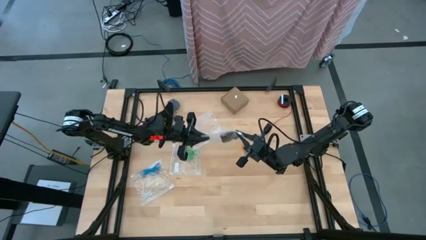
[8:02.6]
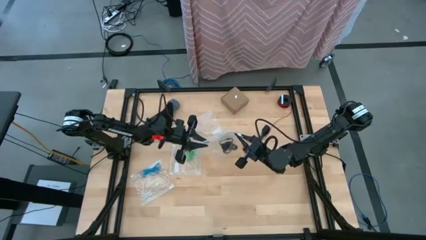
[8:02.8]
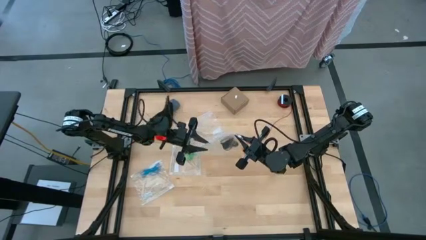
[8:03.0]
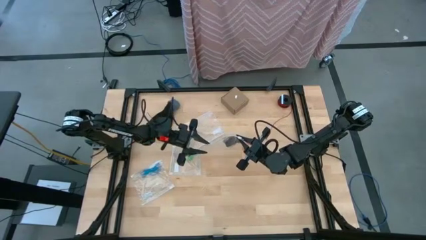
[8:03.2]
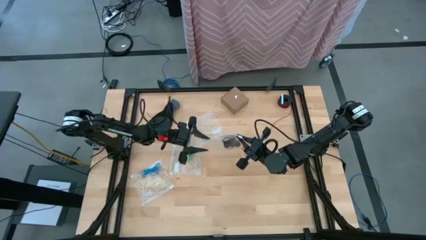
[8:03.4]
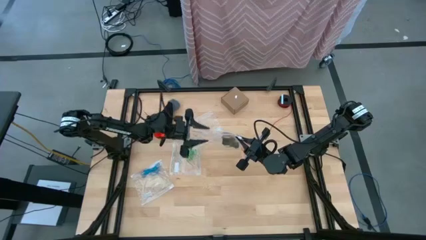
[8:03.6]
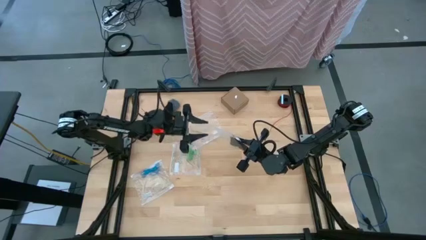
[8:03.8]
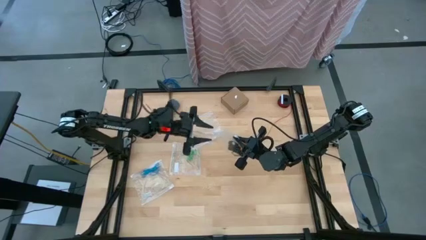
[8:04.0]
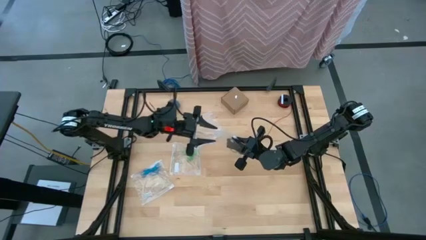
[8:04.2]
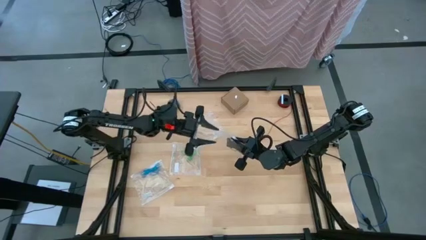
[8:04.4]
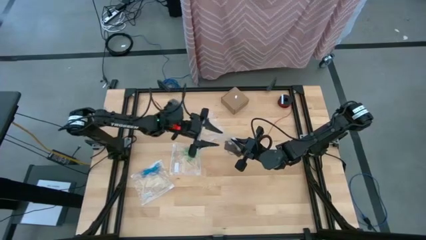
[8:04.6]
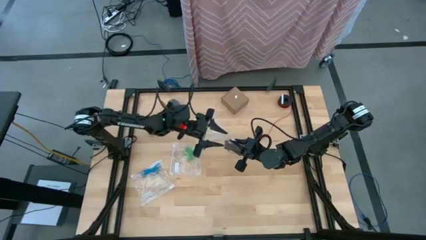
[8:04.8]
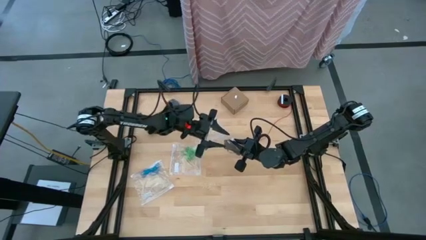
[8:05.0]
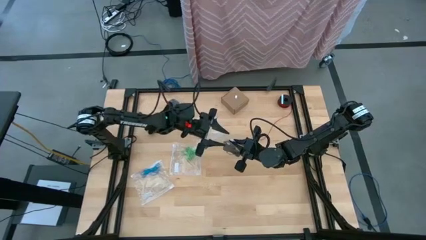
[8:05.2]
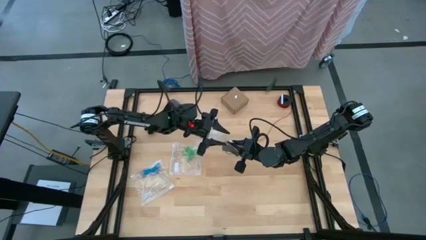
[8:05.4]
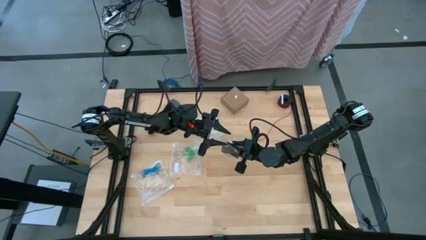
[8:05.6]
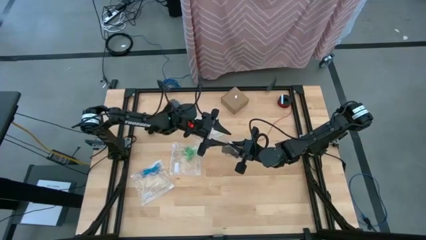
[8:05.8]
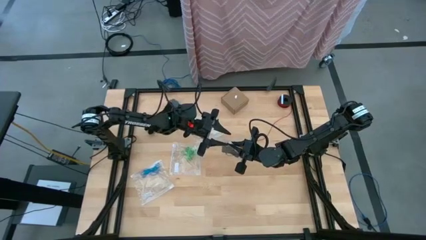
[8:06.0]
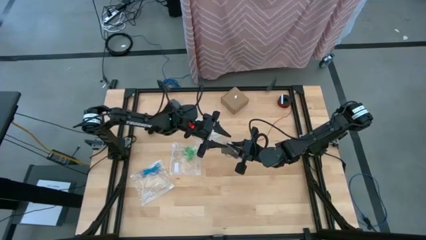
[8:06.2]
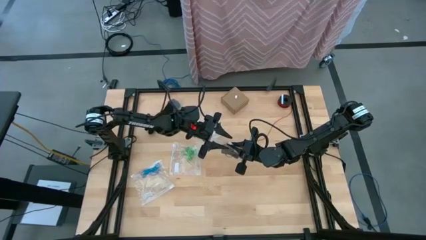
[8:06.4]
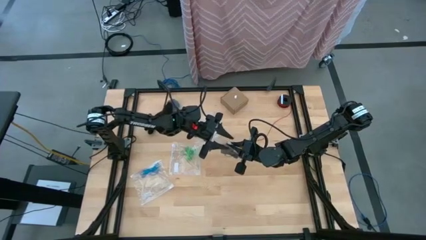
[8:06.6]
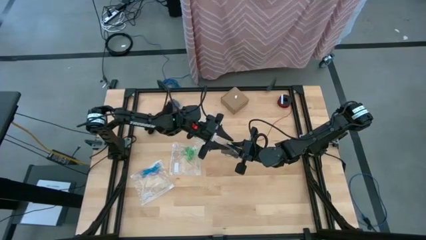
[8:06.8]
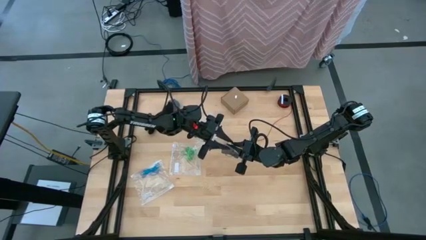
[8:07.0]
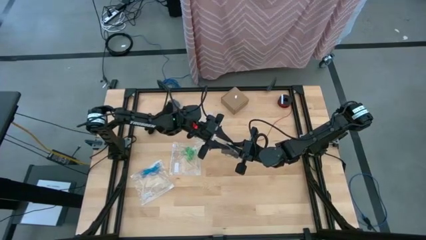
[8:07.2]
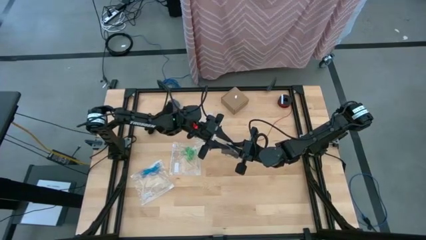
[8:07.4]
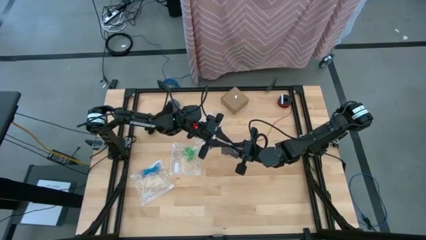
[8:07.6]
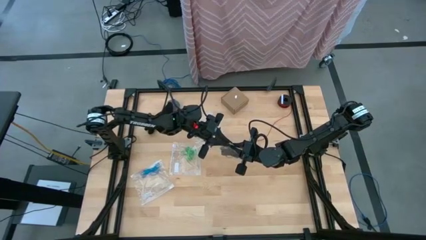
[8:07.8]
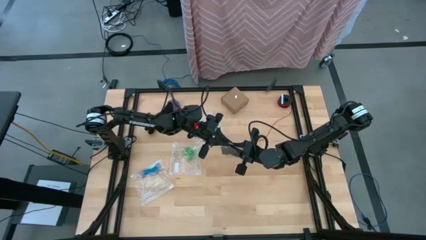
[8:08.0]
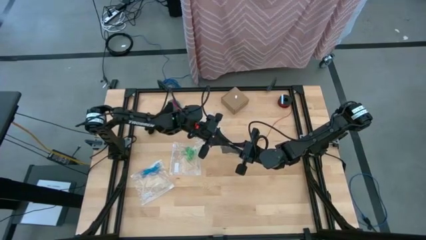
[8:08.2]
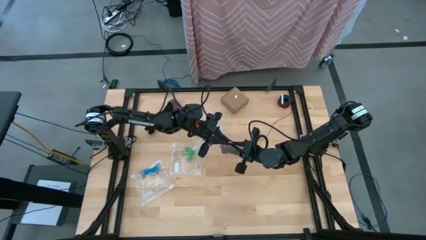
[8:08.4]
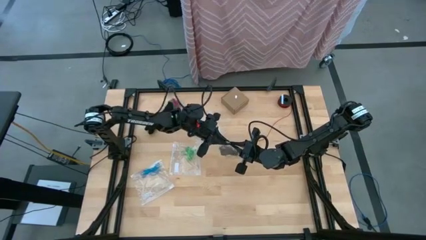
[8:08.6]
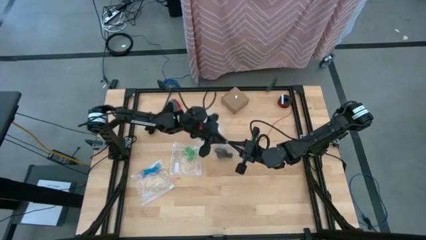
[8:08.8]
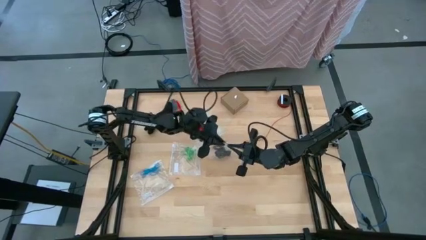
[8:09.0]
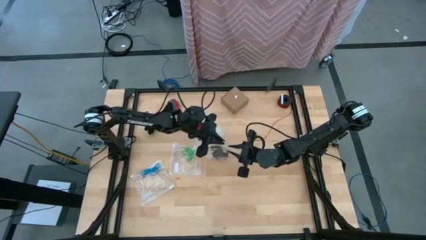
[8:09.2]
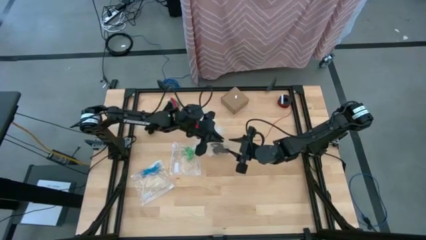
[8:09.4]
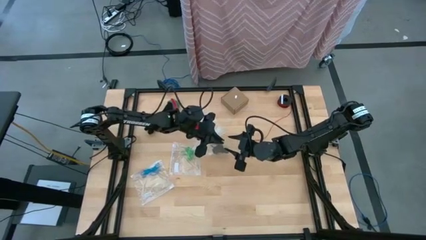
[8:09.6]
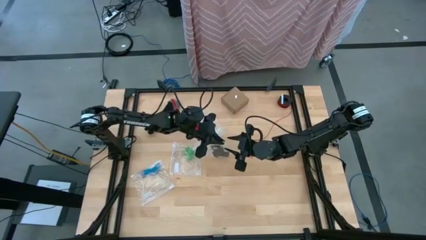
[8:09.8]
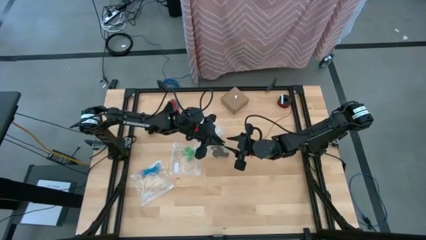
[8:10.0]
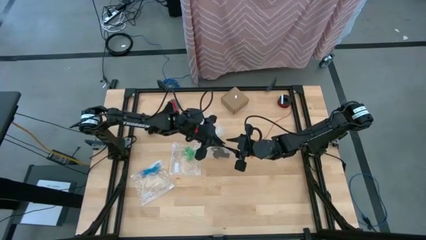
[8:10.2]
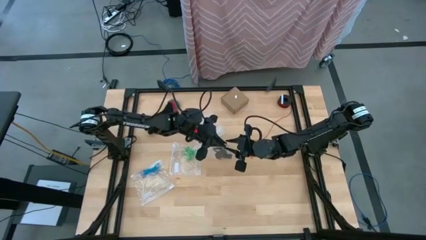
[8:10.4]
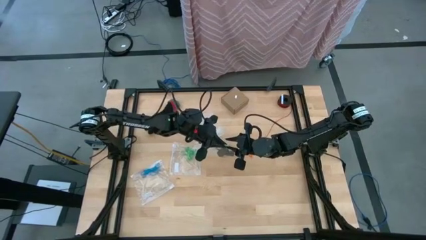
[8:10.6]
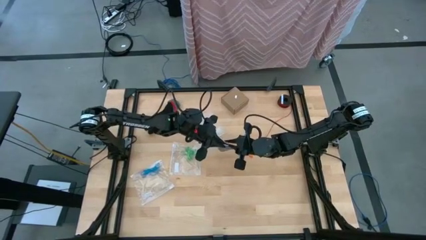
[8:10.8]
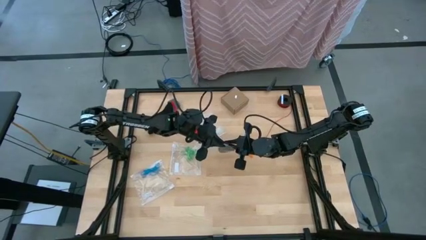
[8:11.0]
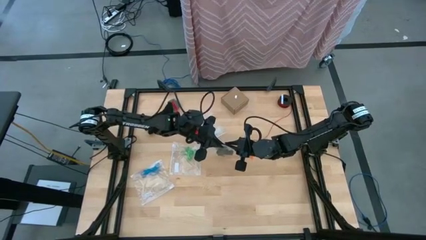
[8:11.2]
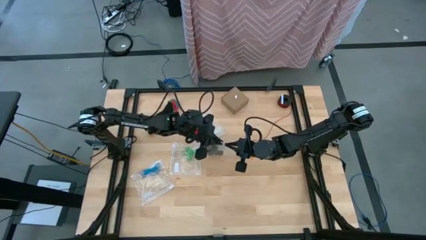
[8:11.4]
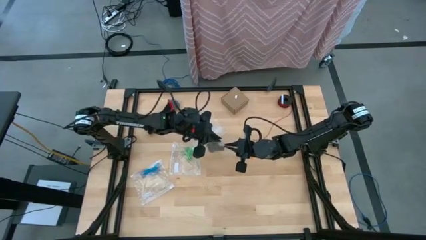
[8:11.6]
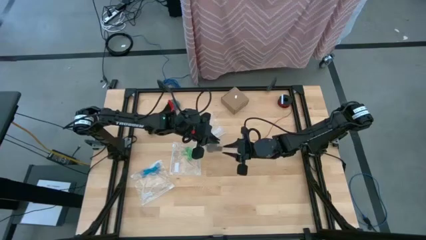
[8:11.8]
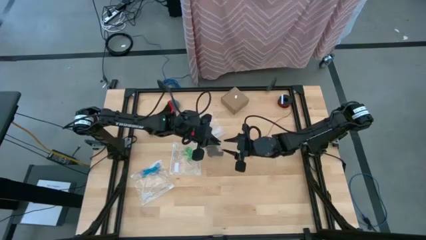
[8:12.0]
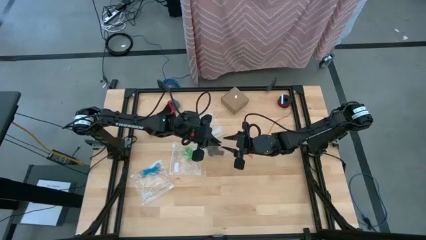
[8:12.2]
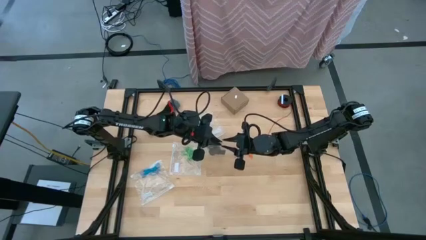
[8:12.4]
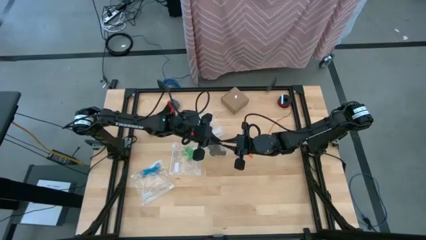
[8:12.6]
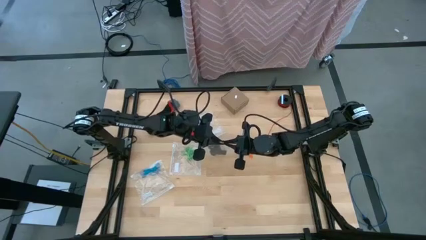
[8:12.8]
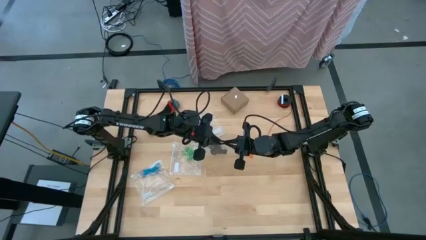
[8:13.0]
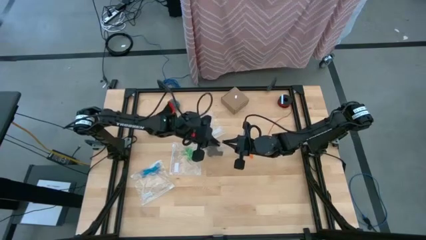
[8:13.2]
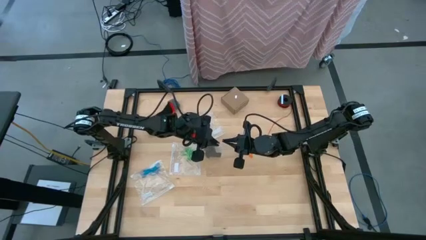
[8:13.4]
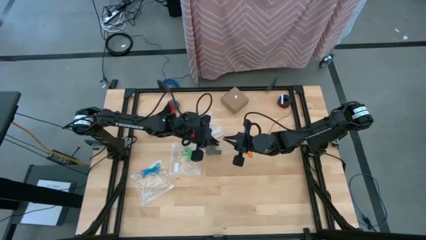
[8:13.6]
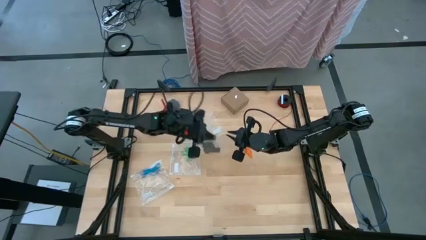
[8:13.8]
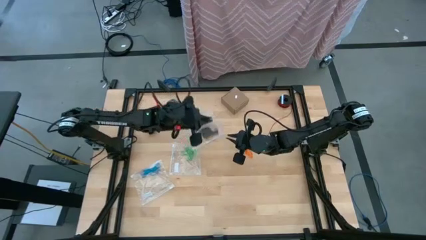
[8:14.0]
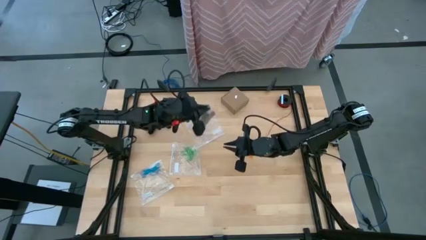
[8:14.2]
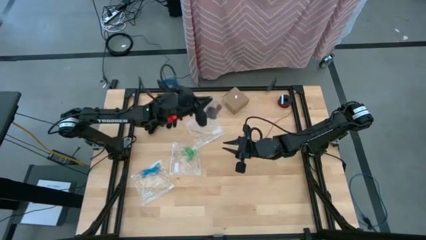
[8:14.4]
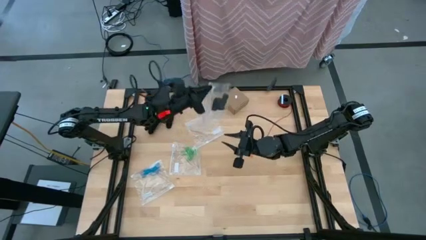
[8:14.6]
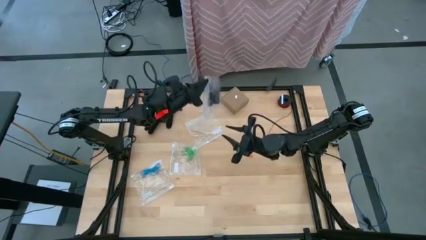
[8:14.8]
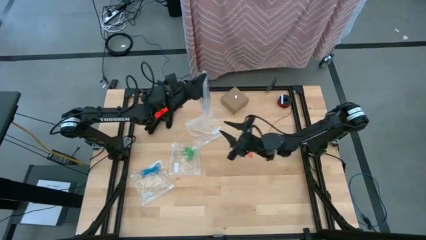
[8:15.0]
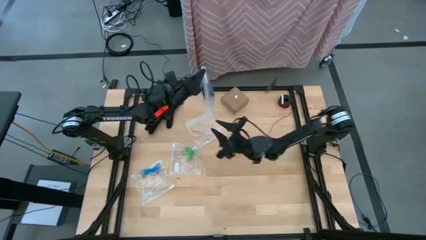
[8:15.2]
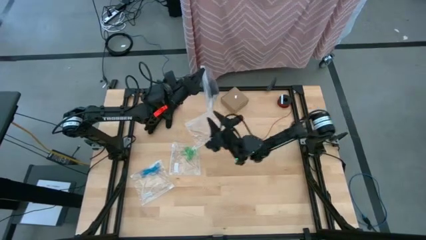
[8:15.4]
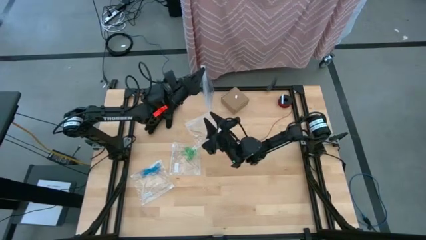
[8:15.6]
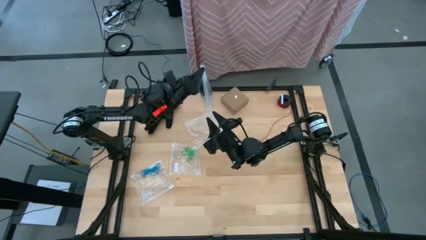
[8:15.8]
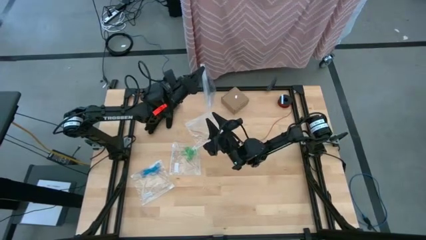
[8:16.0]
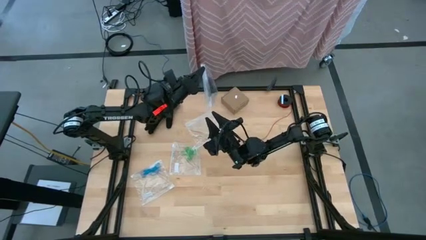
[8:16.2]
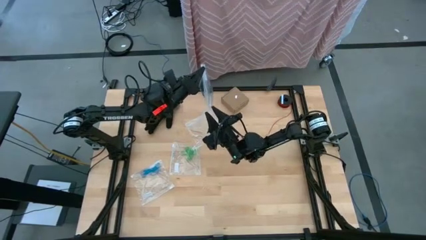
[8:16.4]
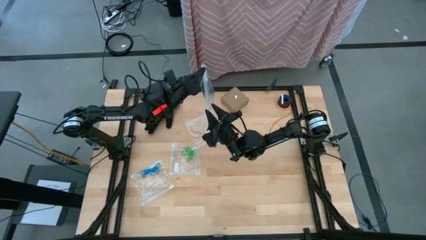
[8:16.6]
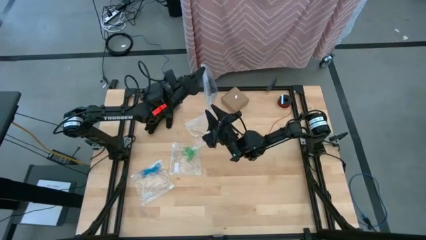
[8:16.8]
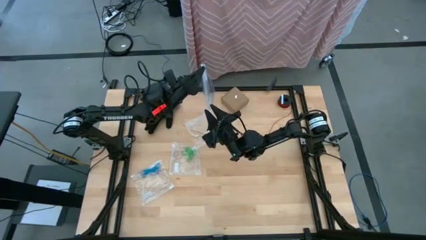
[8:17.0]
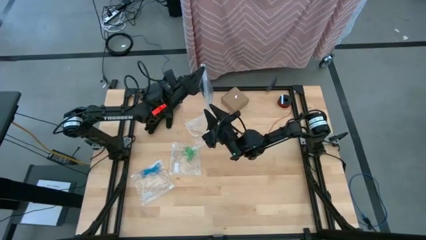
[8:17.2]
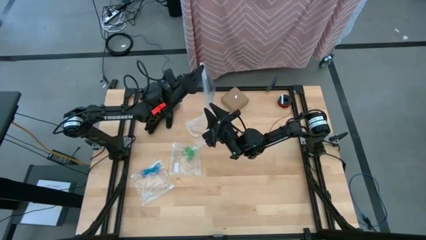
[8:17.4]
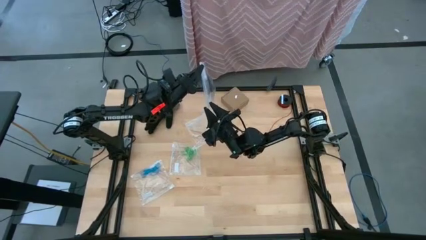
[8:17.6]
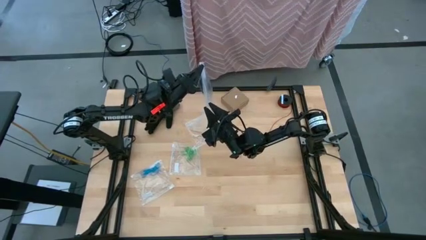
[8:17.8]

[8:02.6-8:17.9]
Task: Sort rubber bands
Close the transparent zip bag

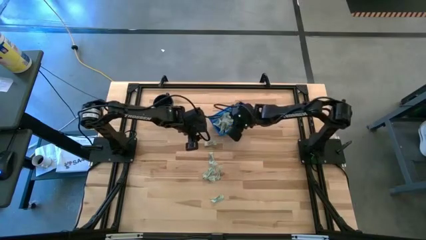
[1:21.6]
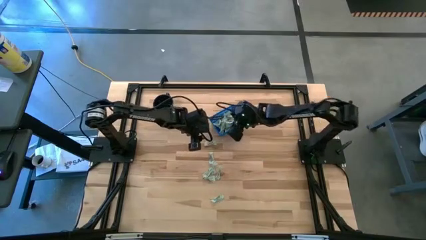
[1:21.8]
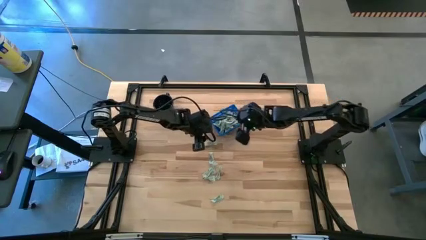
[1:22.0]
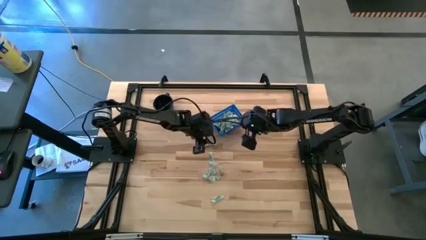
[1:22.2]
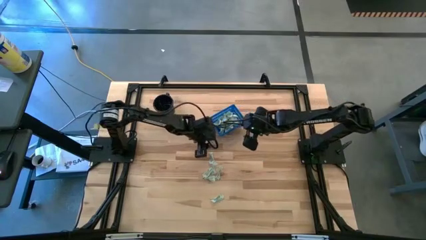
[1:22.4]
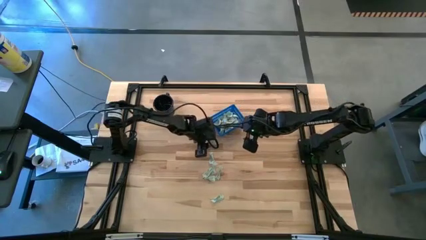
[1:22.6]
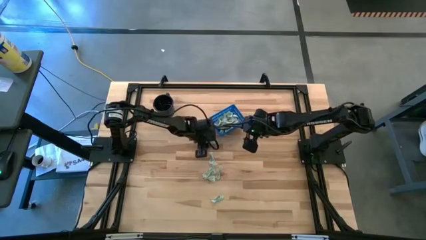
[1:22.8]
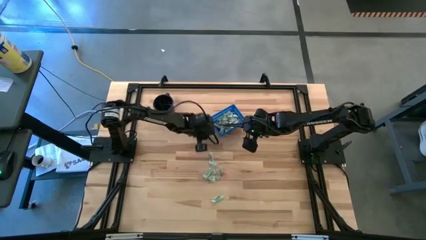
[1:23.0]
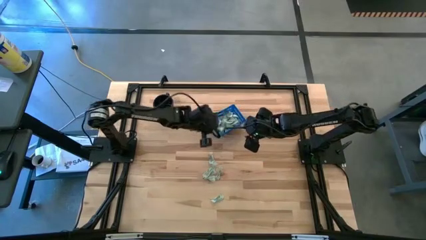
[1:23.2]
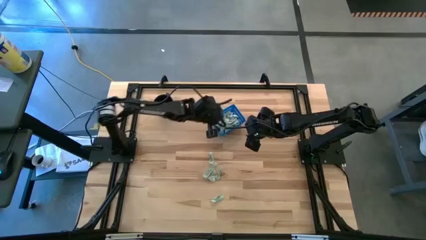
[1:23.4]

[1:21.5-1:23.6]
Task: Pick and place Stevia / Truvia into bins
Put the green stevia packet into the blue bin
